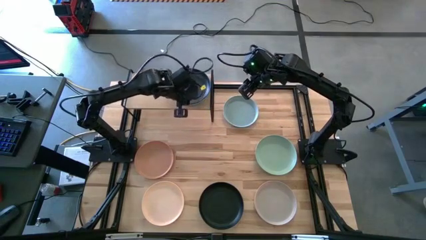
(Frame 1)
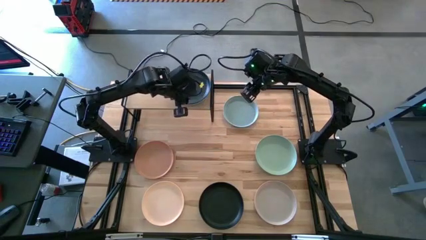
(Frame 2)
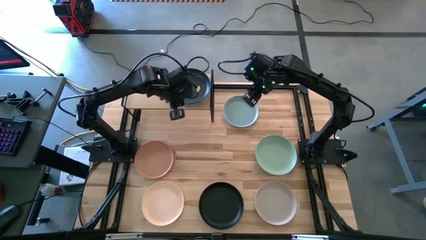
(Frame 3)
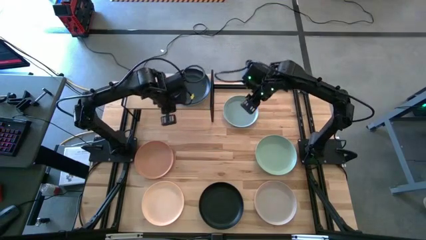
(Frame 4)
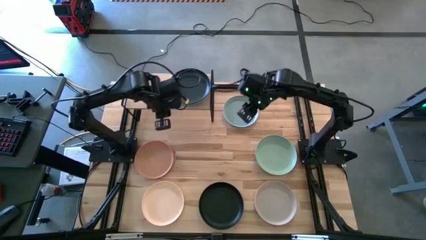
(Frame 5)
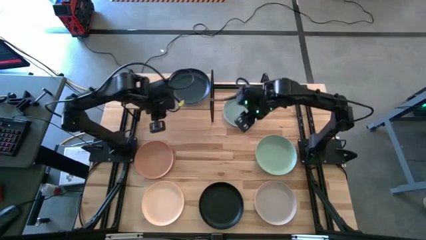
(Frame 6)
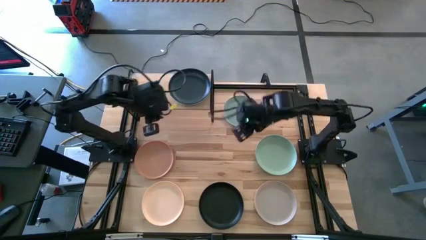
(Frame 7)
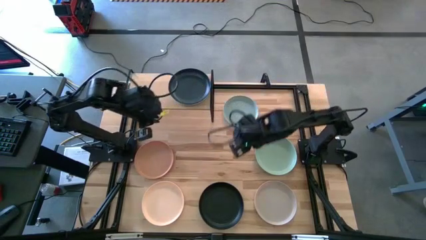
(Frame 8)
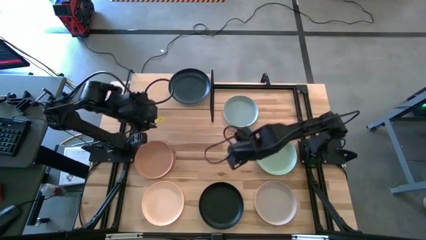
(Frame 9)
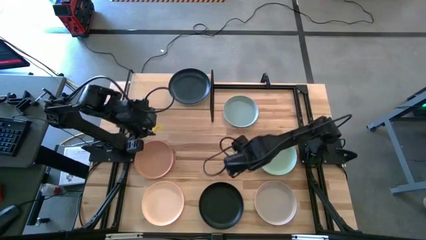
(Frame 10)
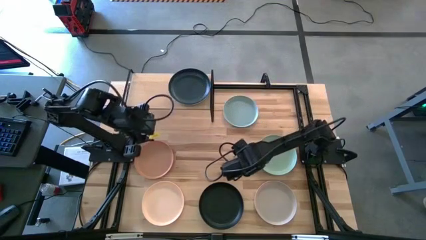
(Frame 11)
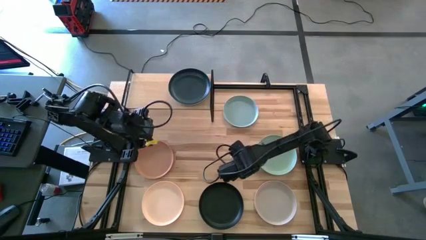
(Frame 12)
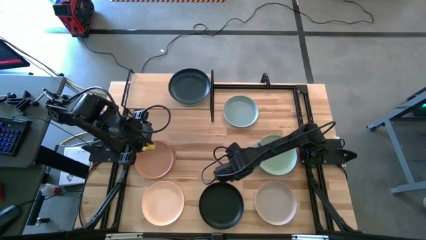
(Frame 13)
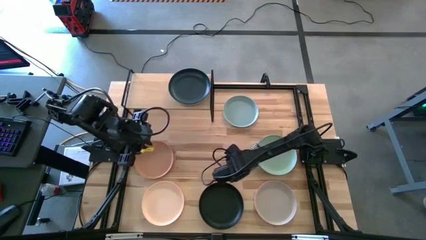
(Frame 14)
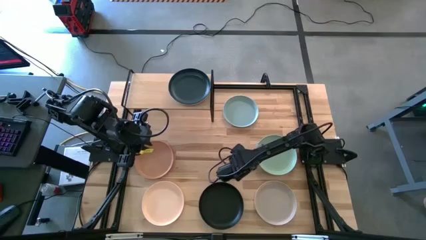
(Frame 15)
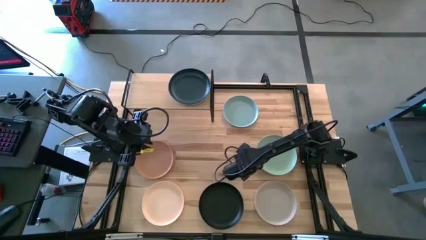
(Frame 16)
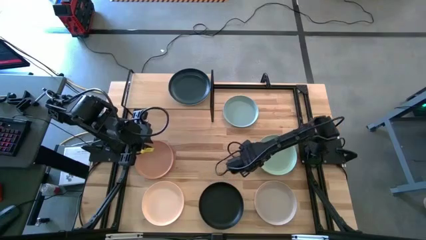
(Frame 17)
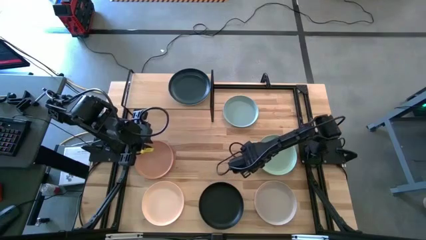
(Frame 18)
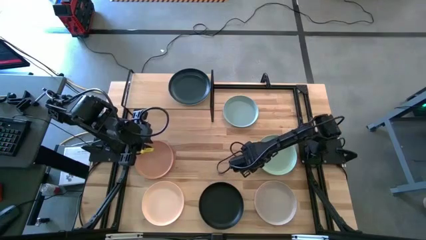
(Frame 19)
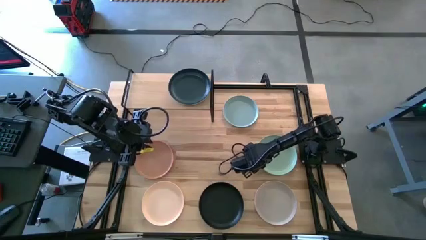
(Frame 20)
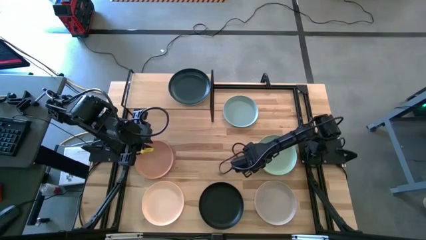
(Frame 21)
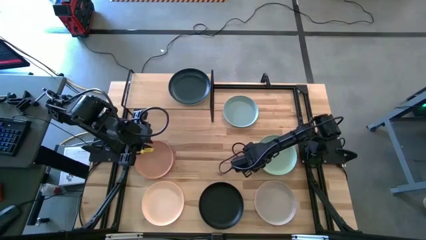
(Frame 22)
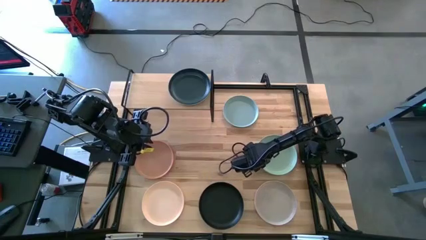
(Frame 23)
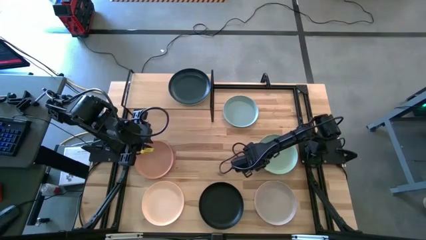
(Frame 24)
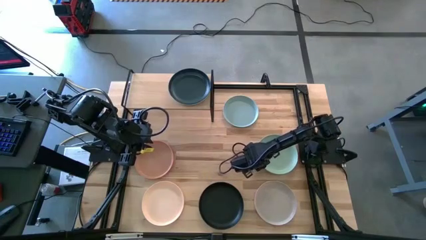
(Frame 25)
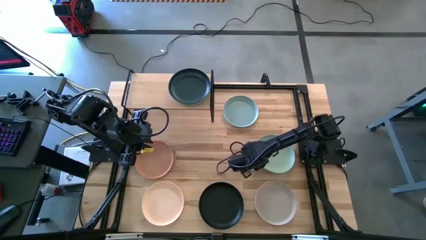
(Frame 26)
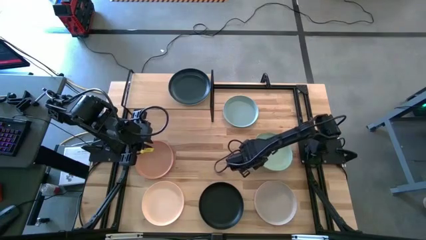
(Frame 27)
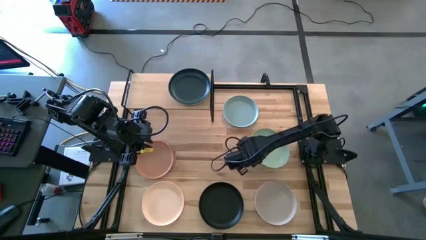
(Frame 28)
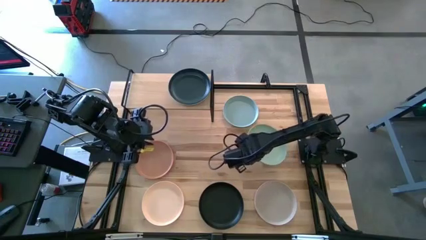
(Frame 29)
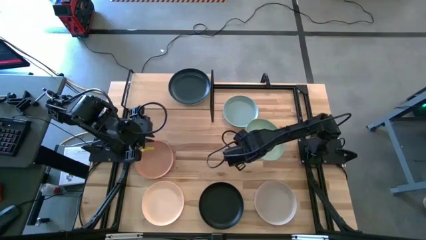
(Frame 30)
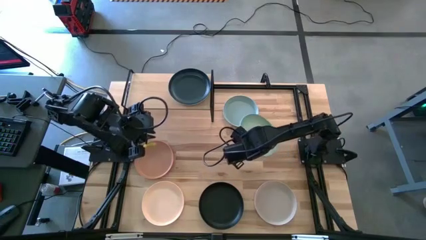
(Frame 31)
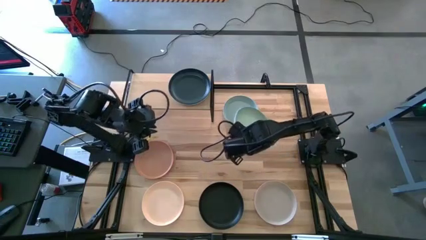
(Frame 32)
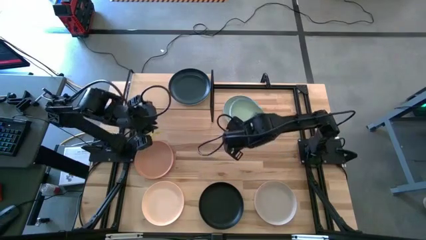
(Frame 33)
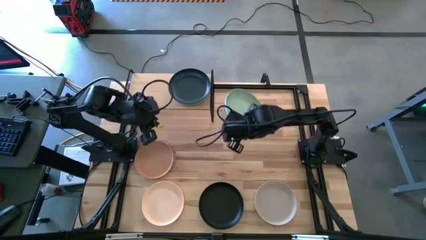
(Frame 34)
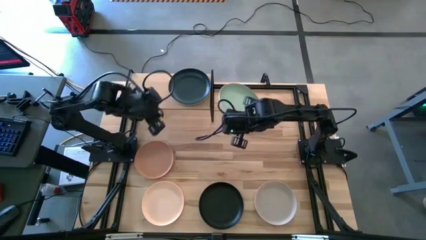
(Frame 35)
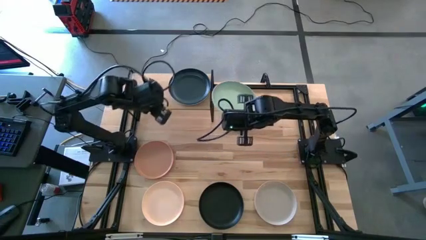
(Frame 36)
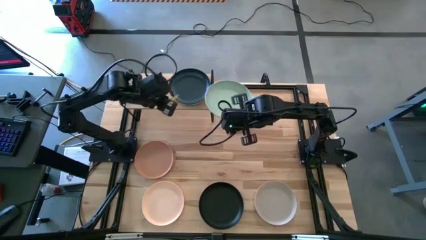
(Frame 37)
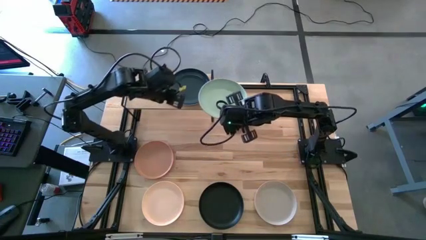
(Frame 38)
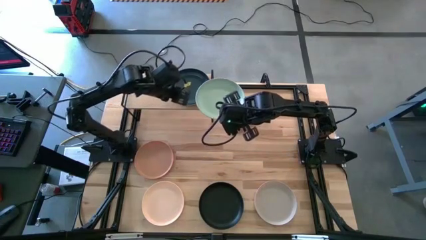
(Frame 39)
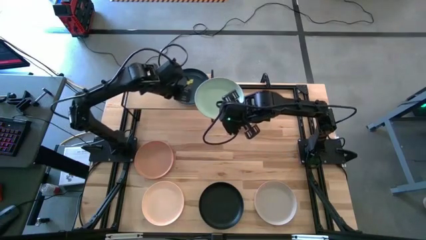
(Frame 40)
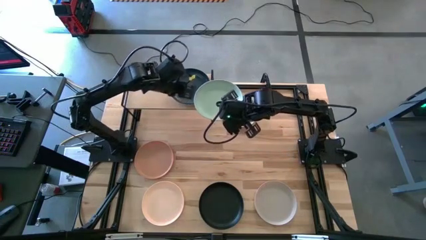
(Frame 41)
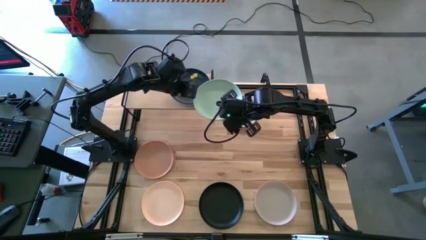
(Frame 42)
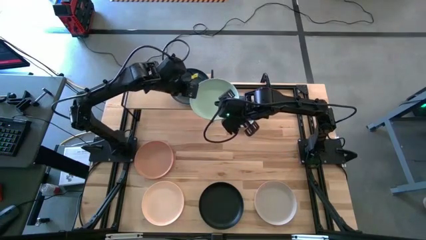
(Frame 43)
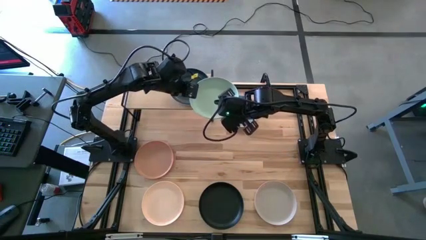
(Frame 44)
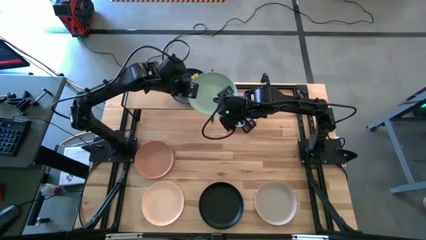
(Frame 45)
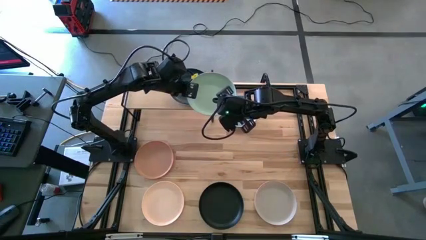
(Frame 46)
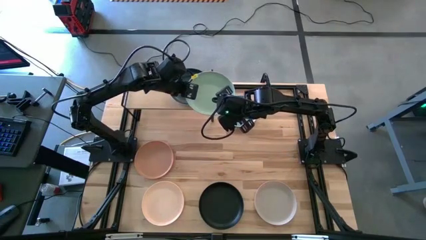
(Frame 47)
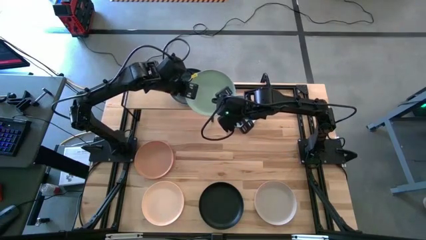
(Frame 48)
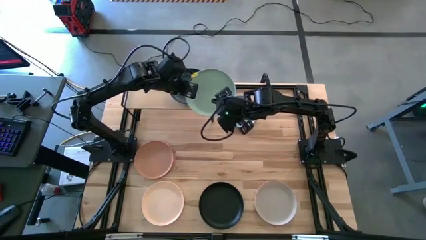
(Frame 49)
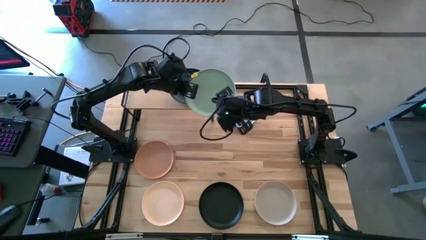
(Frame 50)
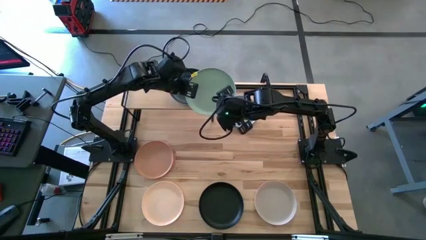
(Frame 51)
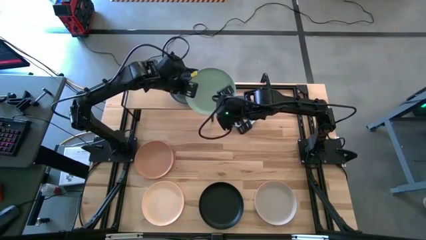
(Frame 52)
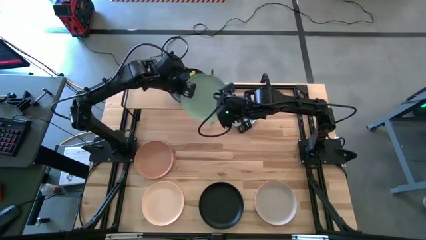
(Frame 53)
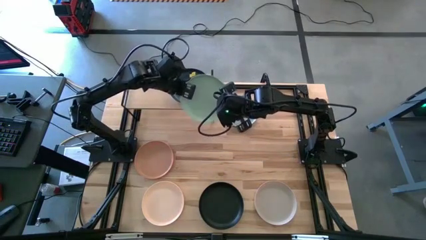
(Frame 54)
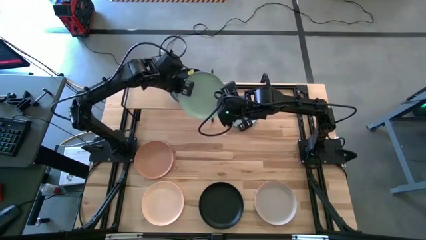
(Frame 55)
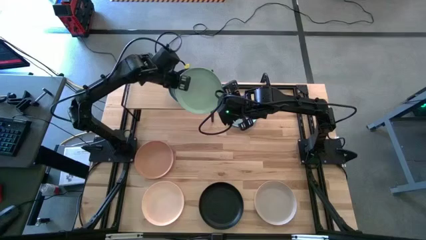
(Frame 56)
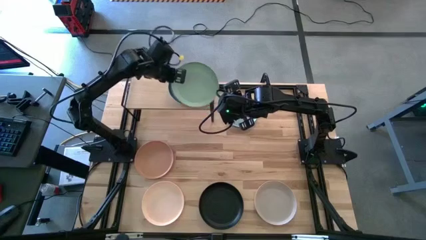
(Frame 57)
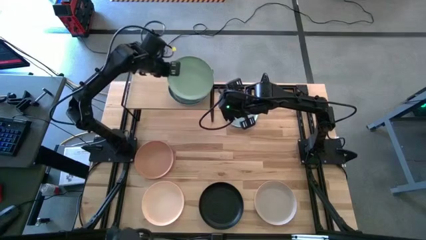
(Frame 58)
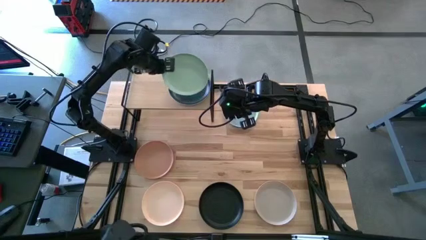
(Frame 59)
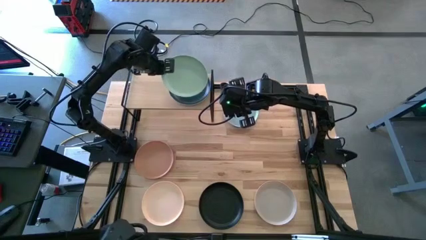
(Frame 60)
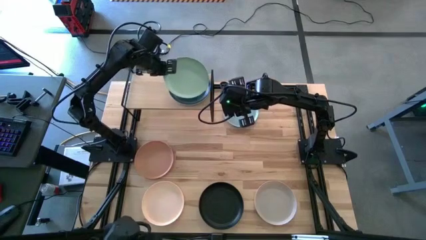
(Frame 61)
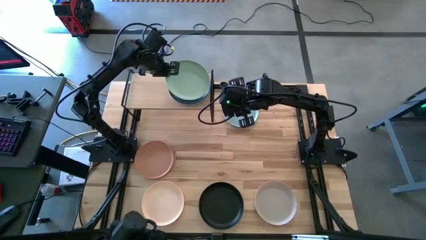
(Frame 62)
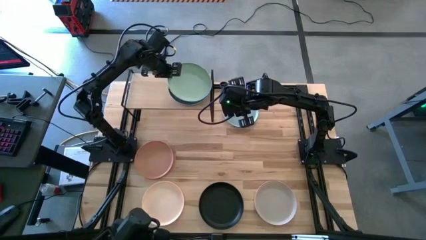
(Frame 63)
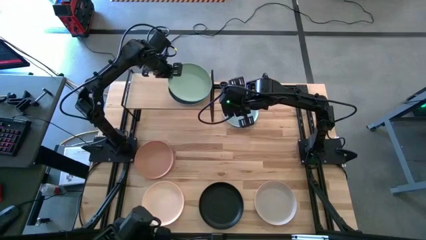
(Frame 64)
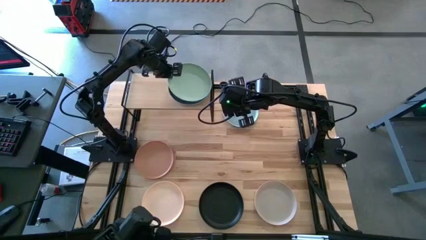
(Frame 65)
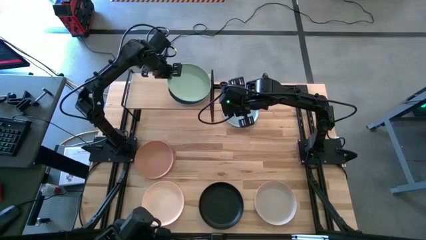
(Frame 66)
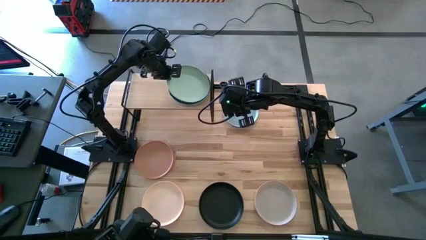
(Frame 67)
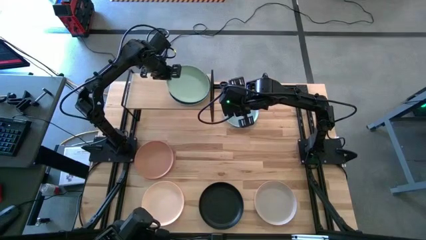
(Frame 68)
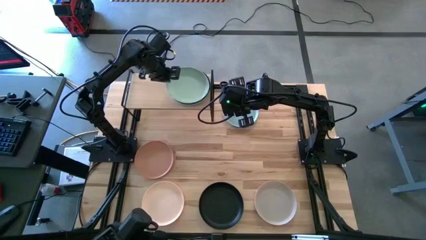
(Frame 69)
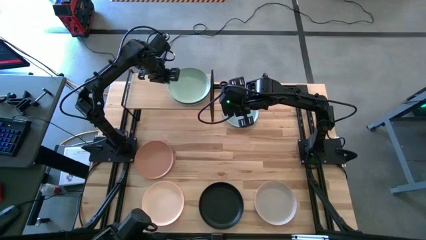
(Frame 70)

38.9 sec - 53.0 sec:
Task: Place and stack plates onto a shelf
Stack the green plate on top of the dark blue plate on the shelf

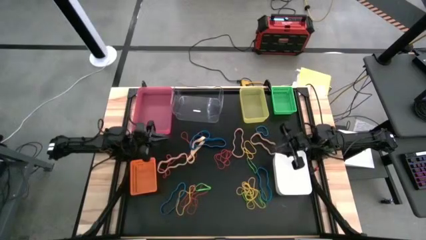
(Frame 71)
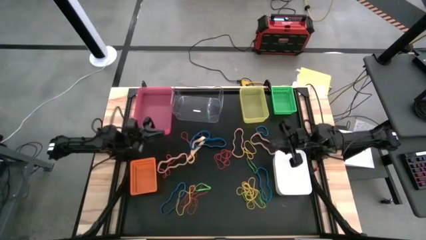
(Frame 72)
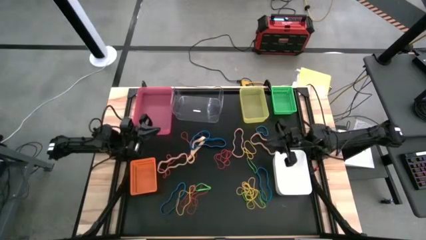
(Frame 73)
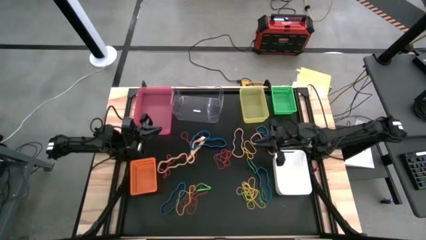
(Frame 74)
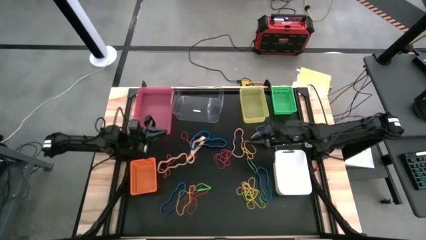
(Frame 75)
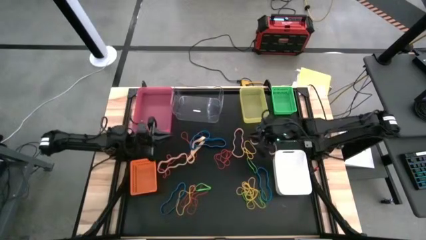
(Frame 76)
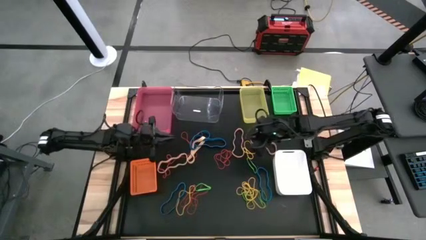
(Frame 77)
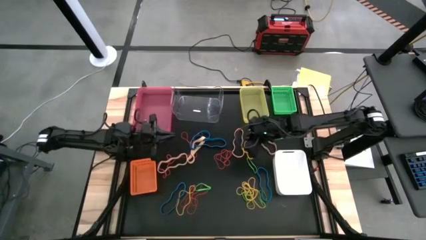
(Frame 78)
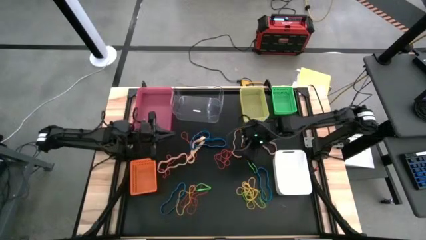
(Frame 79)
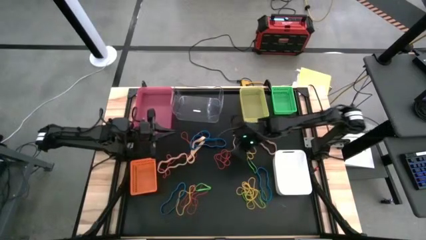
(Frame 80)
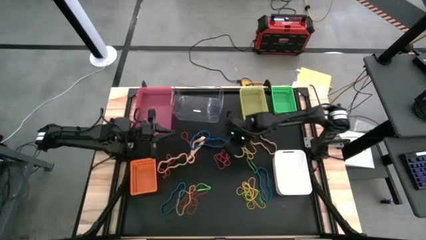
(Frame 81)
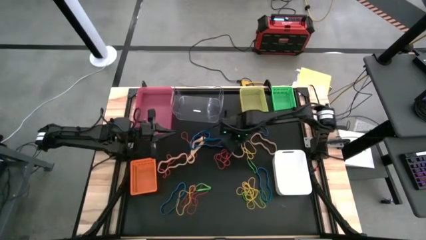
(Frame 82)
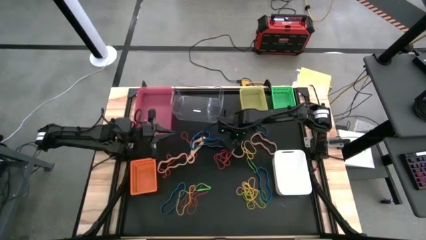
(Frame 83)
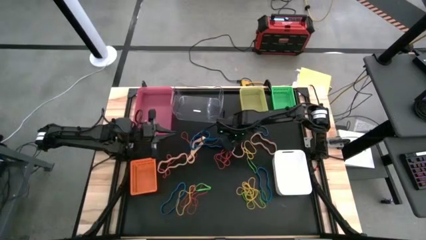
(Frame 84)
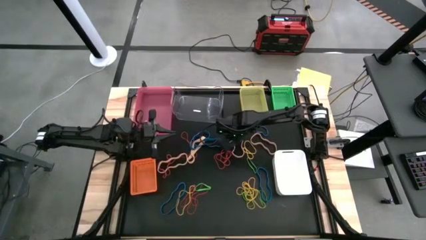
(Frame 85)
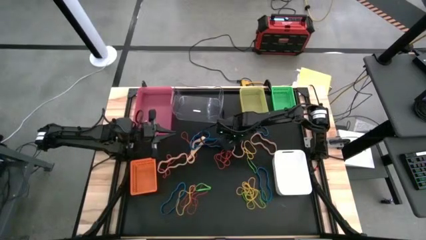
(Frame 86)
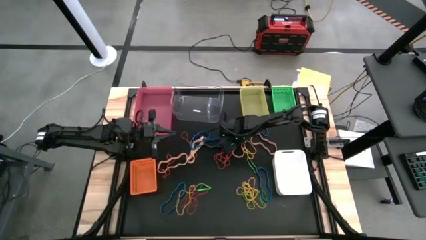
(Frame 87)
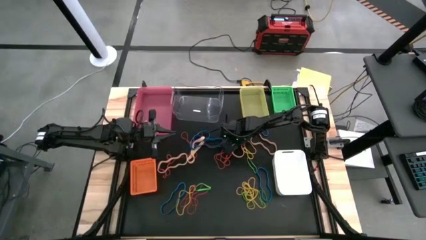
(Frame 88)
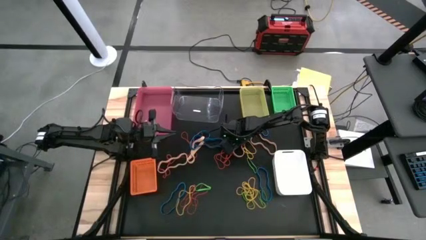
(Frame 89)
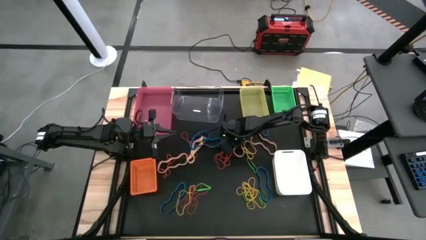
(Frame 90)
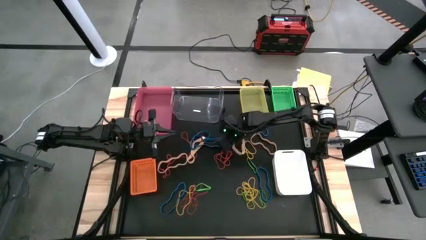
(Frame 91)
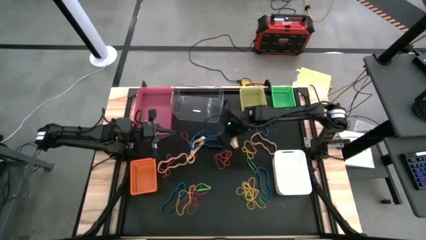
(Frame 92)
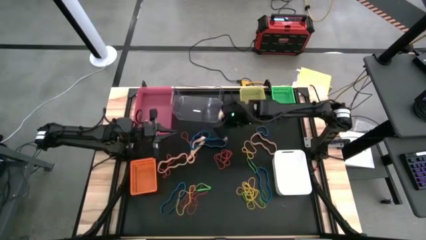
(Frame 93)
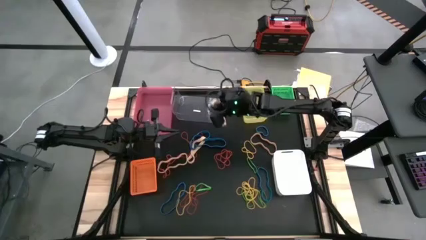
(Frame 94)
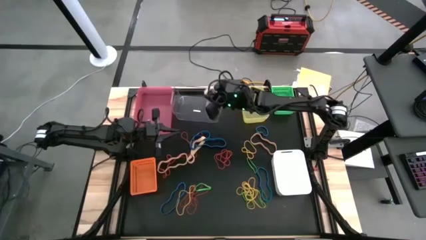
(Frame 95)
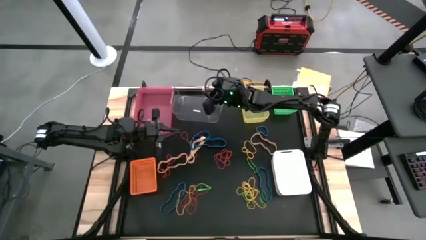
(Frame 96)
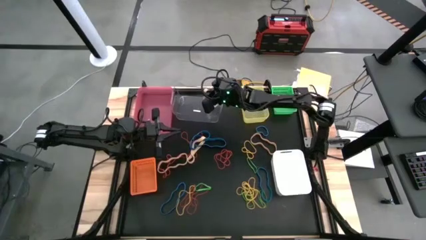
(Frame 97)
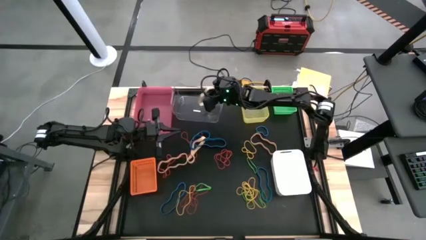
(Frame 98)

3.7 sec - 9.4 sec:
Task: Sort rubber bands into baskets
Put the brown rubber band into the transparent bin
